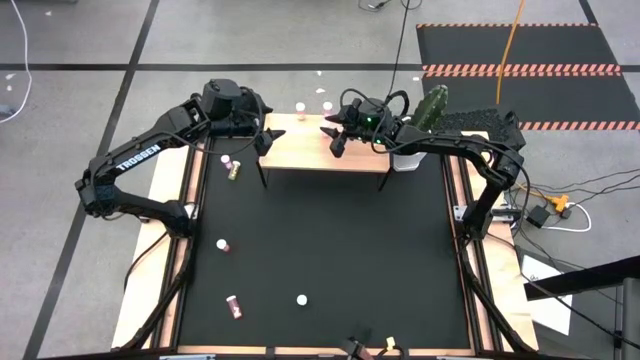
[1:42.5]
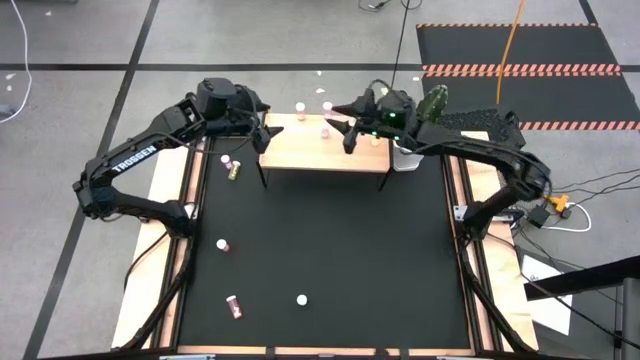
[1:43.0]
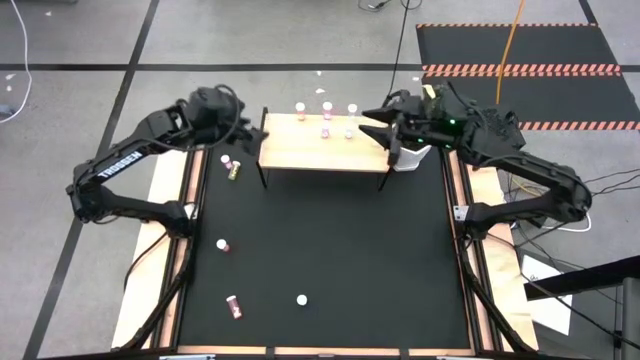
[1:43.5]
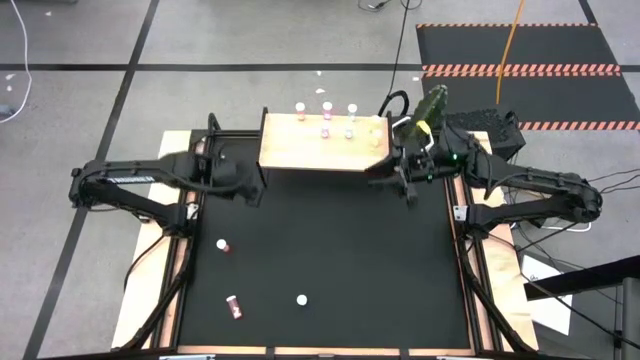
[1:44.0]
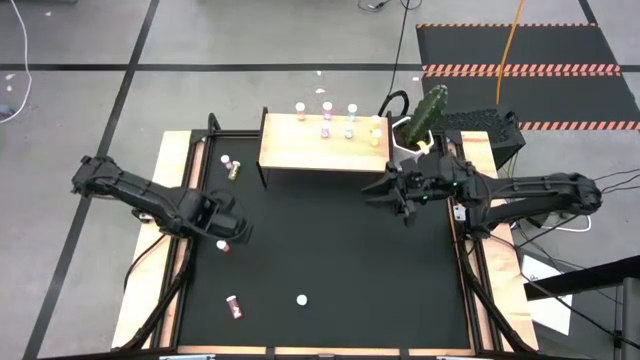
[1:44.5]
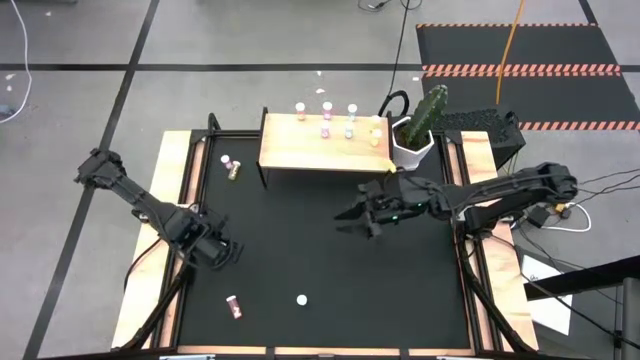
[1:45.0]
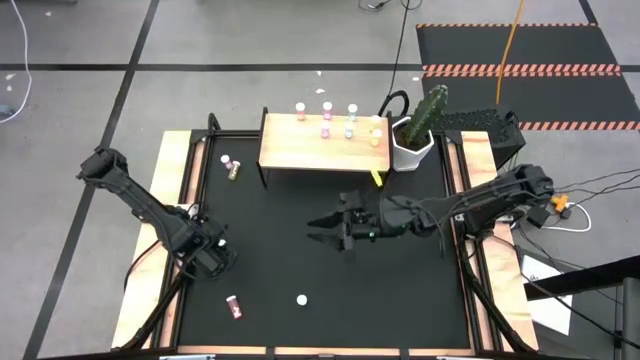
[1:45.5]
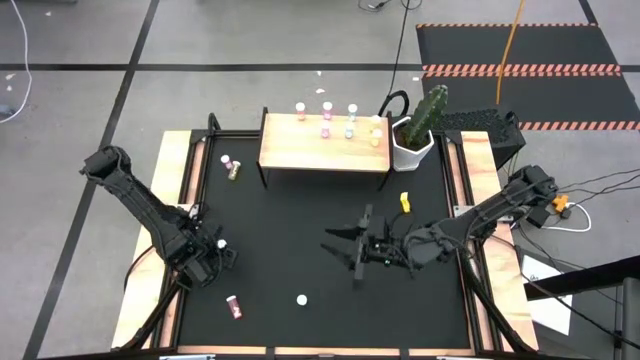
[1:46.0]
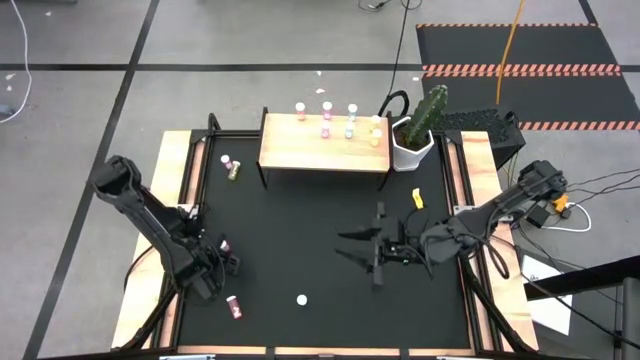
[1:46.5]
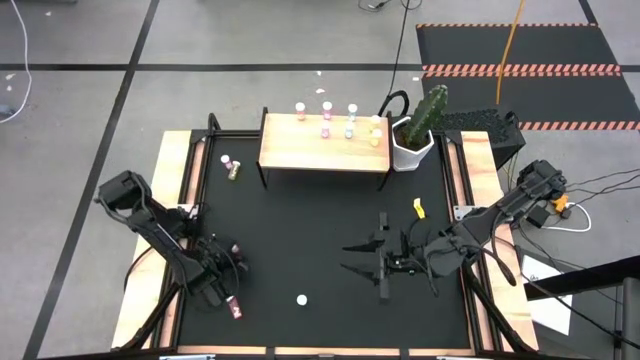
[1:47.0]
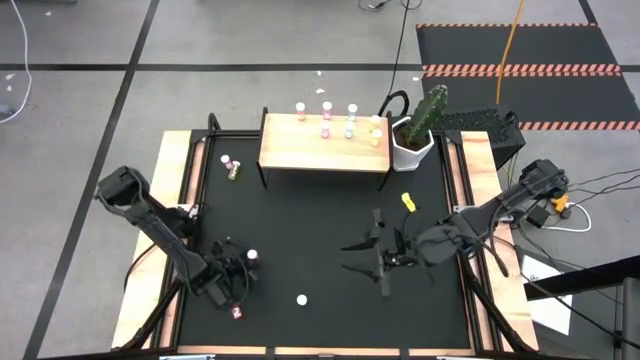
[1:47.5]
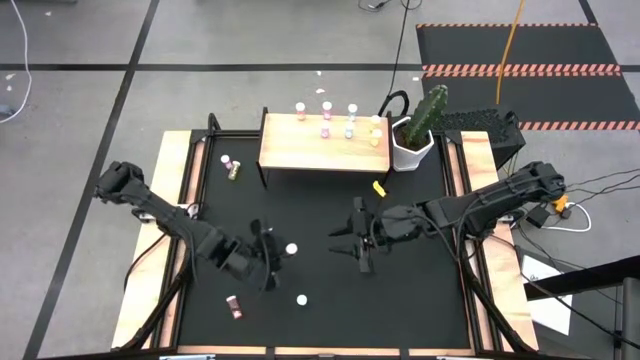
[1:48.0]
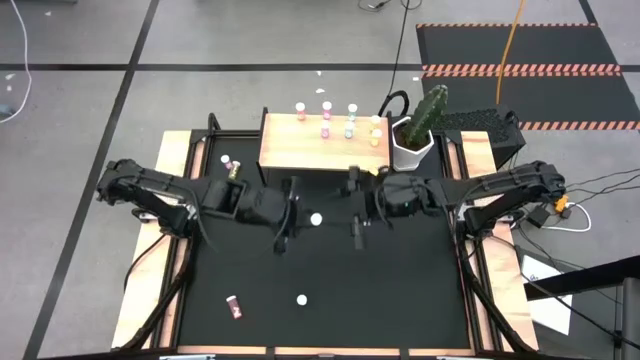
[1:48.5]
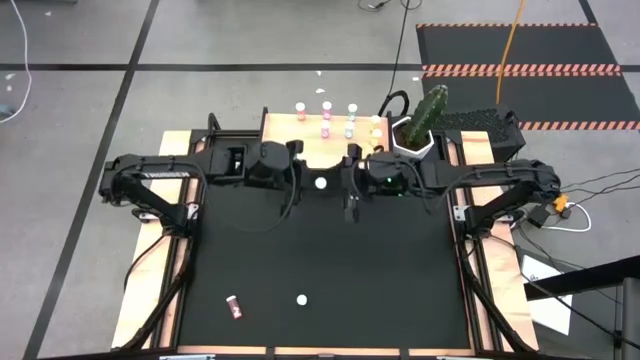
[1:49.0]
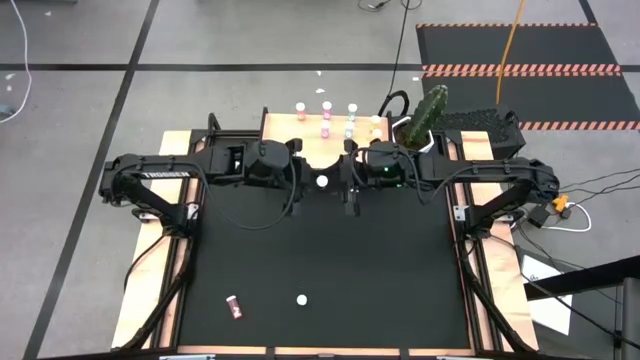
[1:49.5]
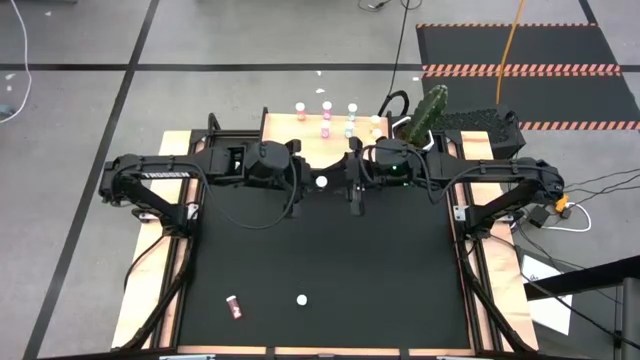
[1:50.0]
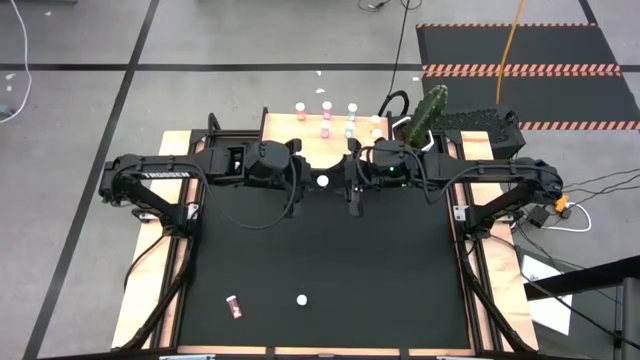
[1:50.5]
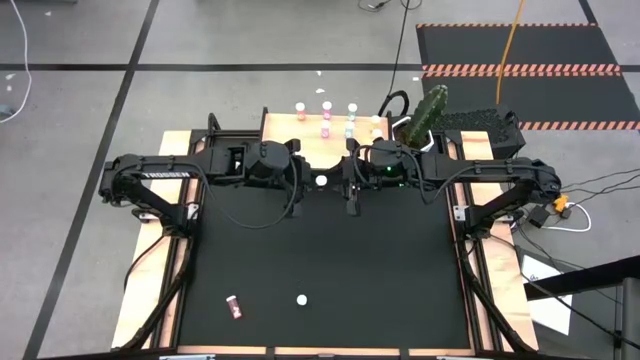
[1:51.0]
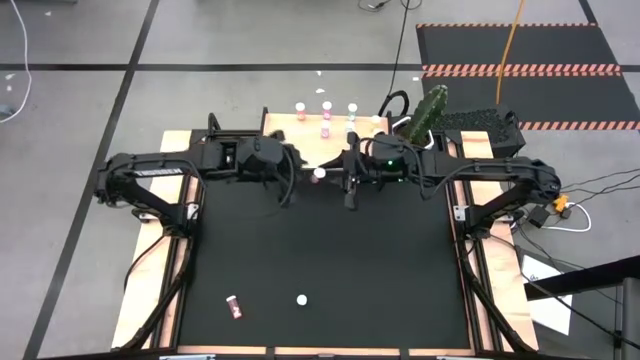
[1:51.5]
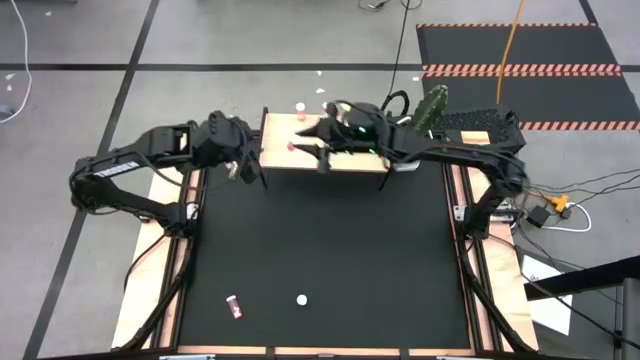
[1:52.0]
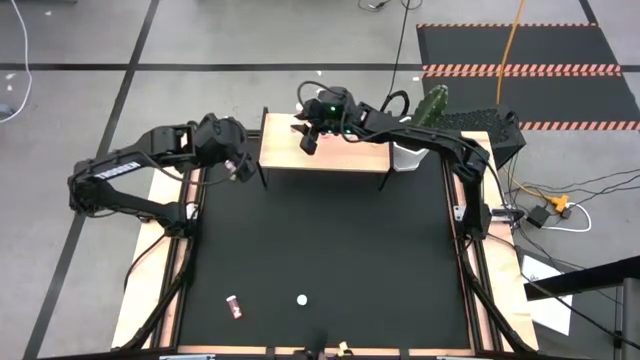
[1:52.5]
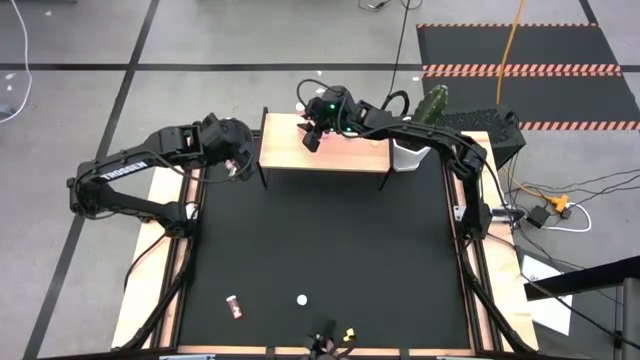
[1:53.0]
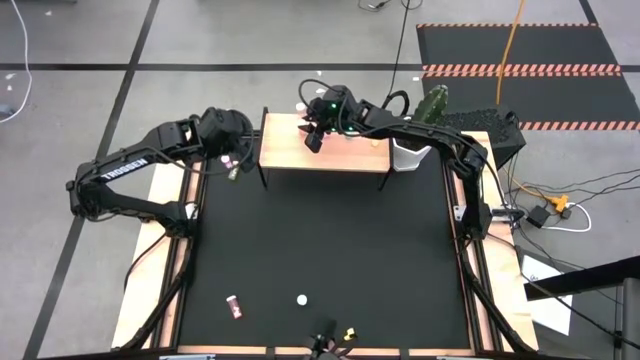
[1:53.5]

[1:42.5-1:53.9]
Task: Pick and place medicine bottles onto shelf by color
Put the top red pill bottle on the shelf aligned with the other red pill bottle

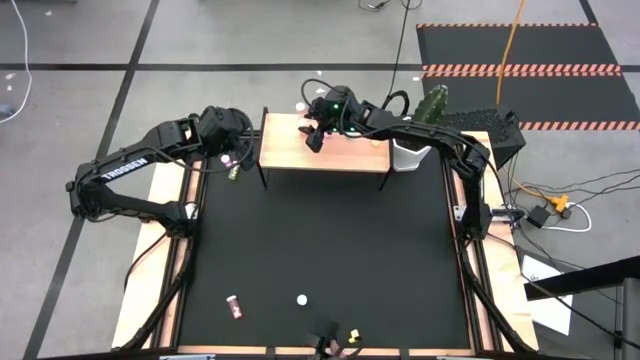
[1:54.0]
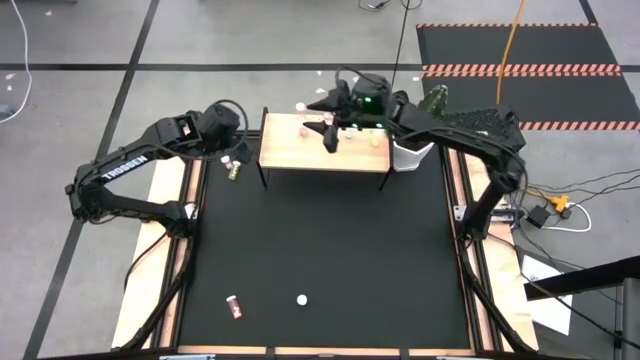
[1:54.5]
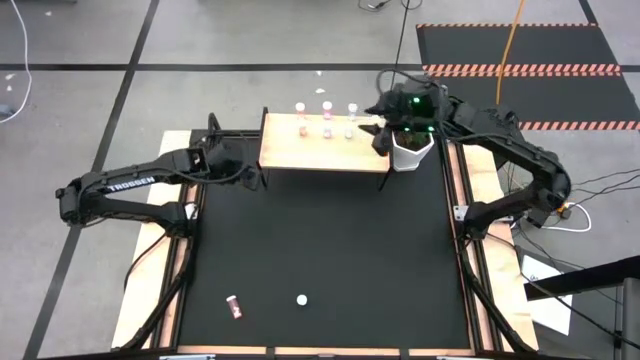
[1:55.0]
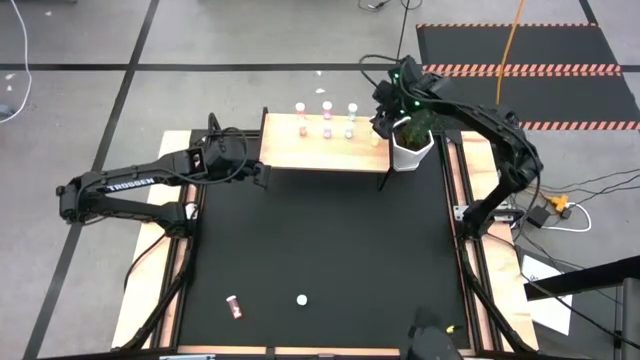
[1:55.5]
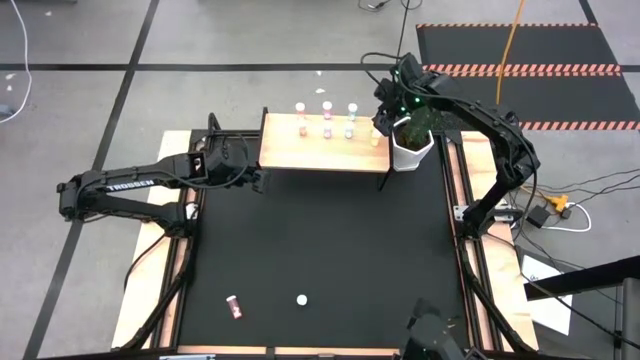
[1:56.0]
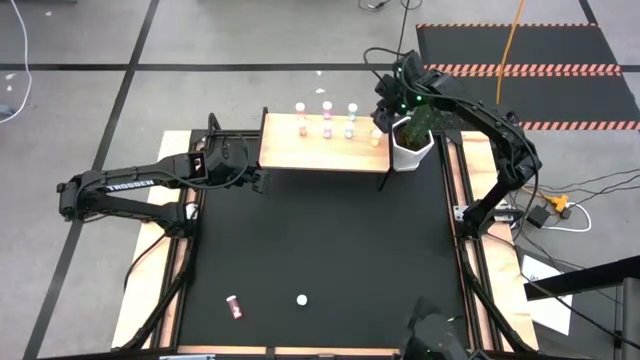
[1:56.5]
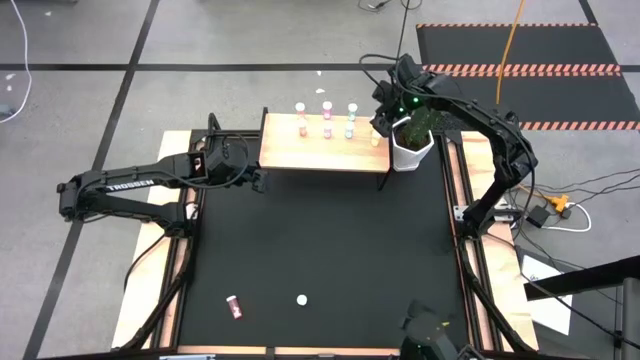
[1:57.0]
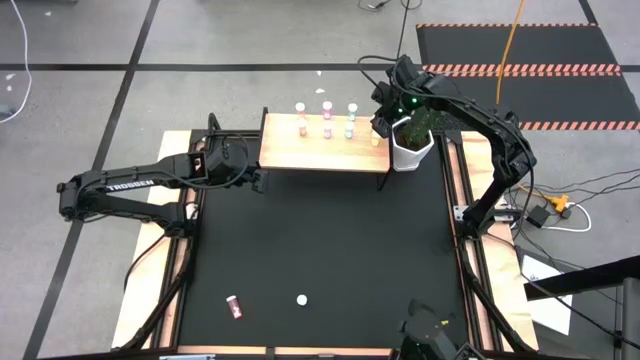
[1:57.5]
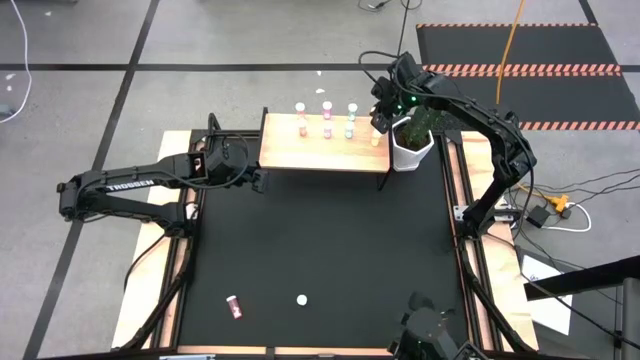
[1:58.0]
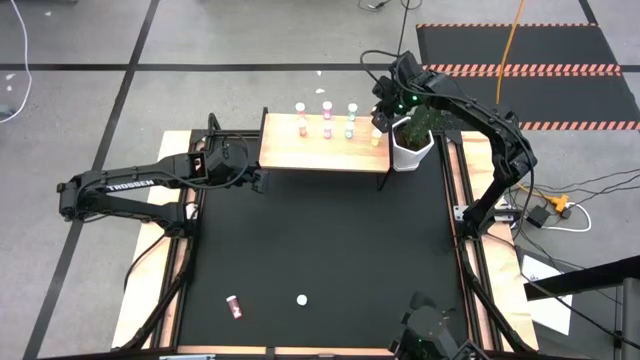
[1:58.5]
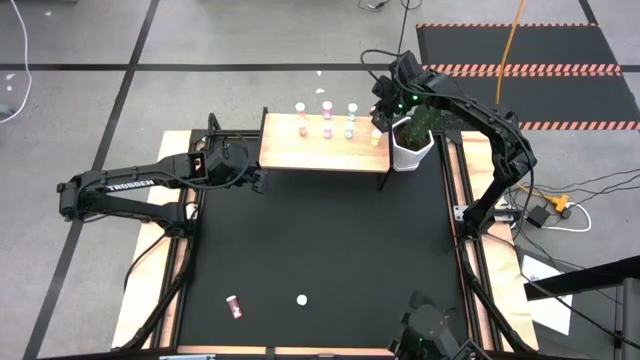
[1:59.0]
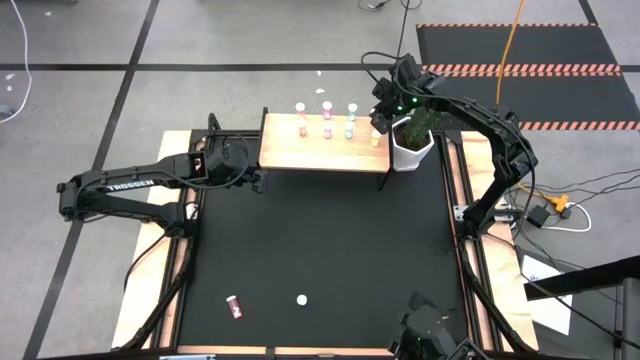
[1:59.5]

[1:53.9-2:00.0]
Adjust the yellow pill bottles on the shelf

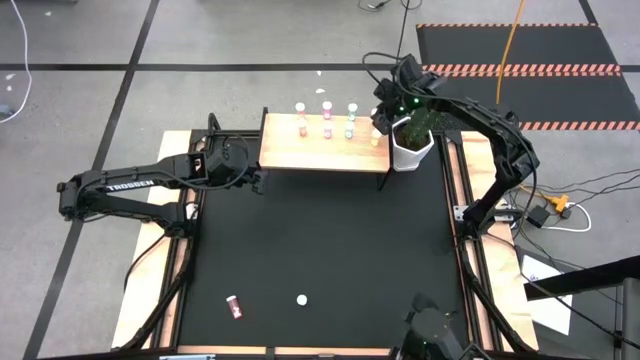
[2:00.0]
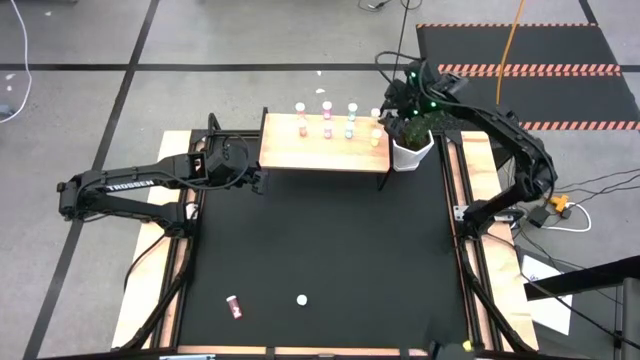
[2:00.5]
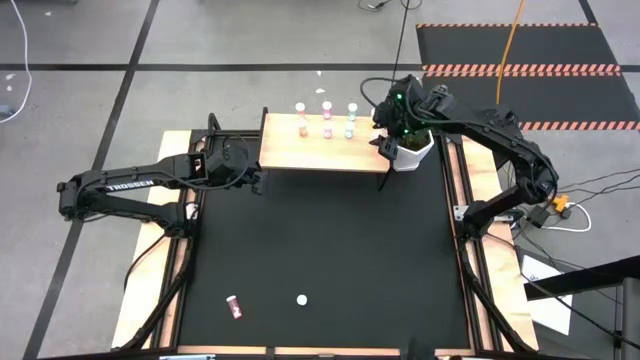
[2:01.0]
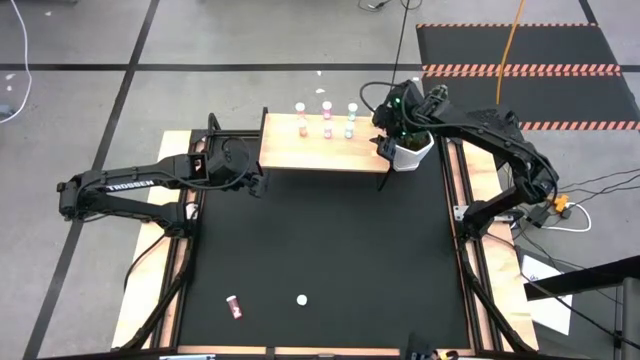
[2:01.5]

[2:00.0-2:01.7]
Adjust the yellow pill bottles on the shelf
